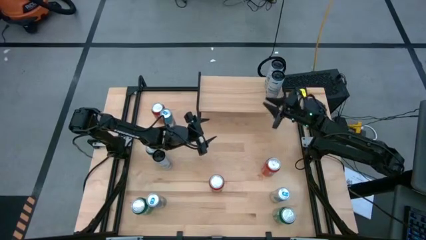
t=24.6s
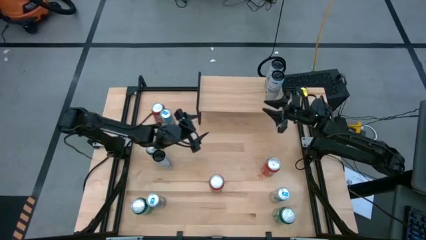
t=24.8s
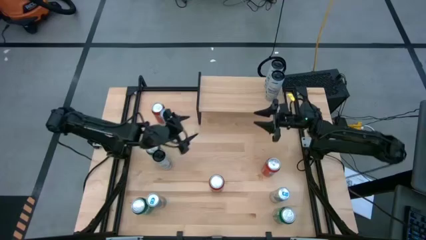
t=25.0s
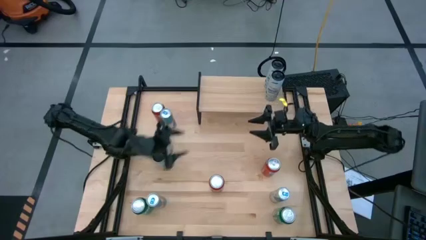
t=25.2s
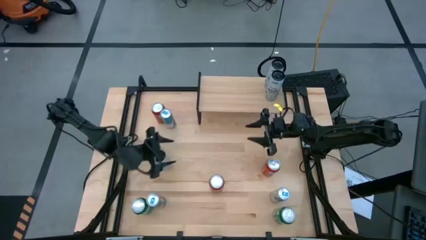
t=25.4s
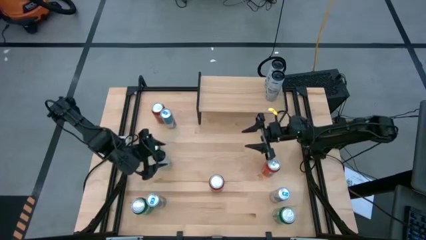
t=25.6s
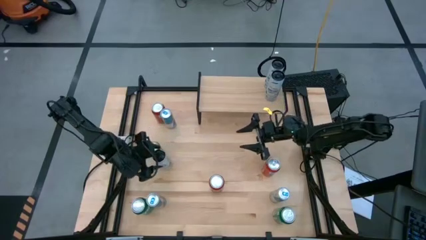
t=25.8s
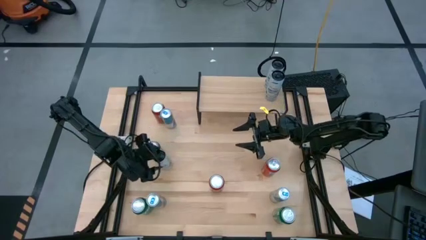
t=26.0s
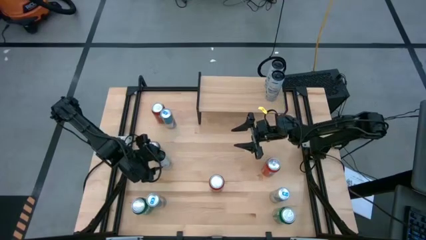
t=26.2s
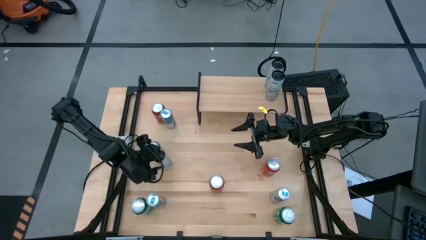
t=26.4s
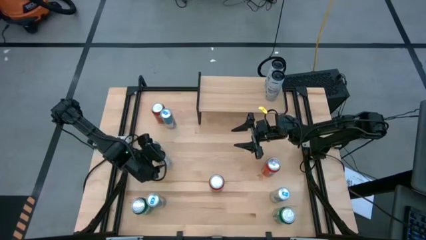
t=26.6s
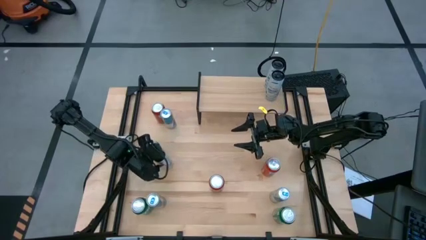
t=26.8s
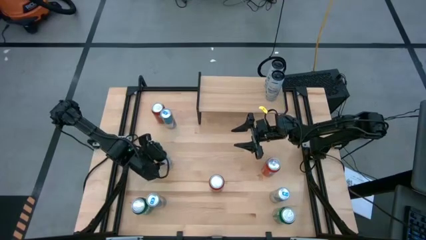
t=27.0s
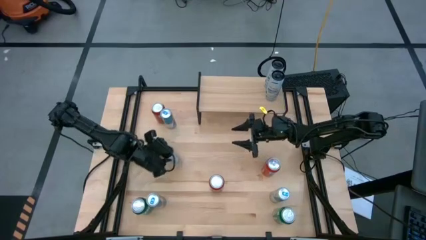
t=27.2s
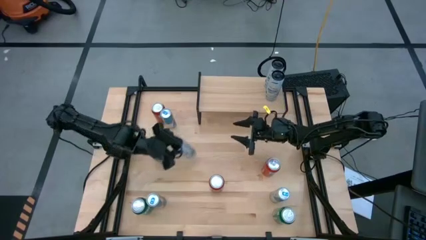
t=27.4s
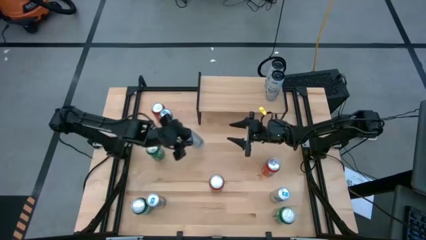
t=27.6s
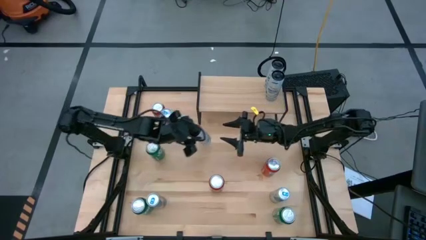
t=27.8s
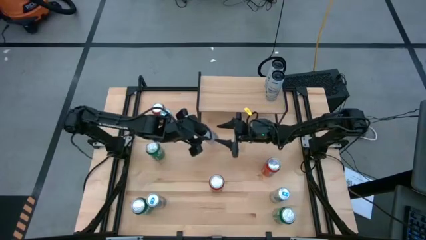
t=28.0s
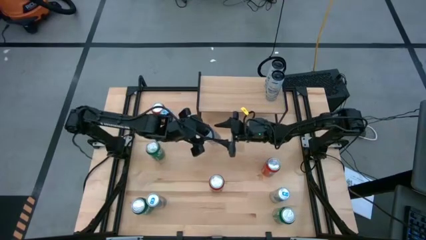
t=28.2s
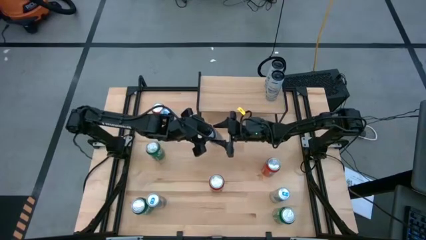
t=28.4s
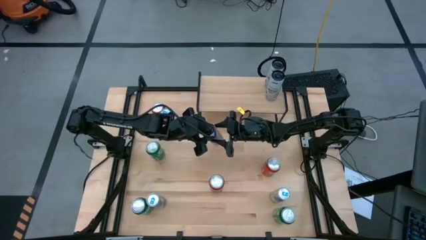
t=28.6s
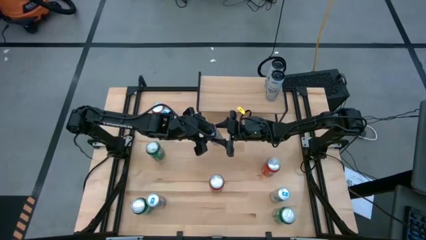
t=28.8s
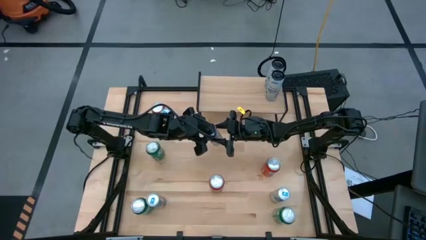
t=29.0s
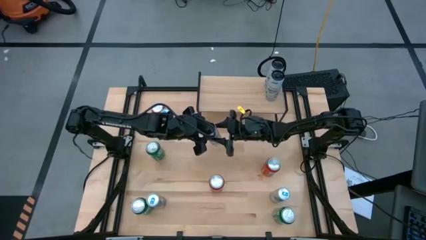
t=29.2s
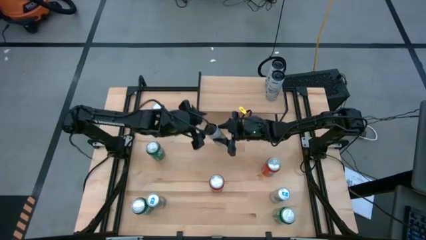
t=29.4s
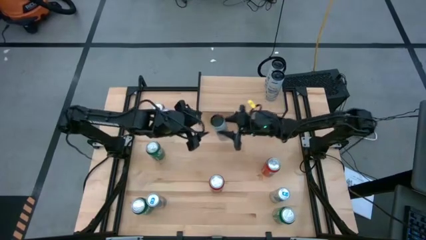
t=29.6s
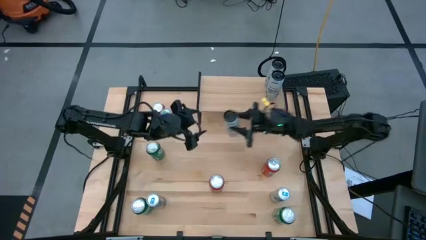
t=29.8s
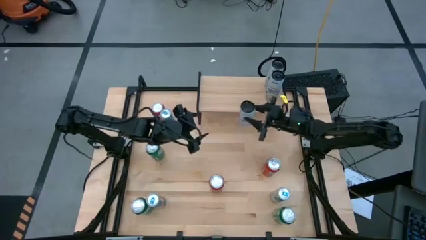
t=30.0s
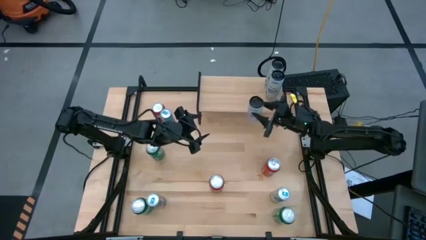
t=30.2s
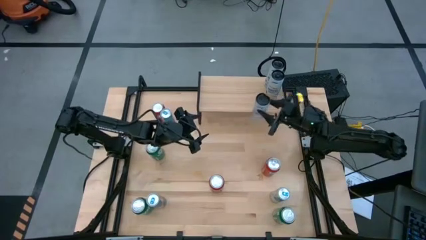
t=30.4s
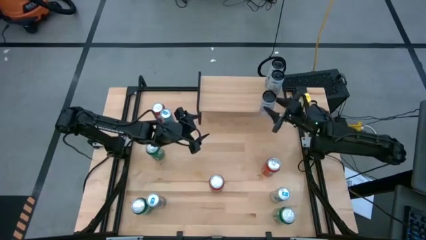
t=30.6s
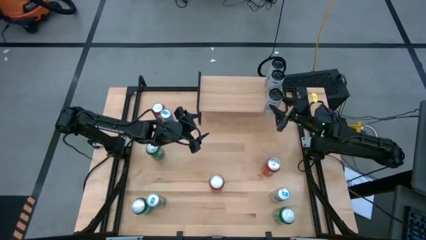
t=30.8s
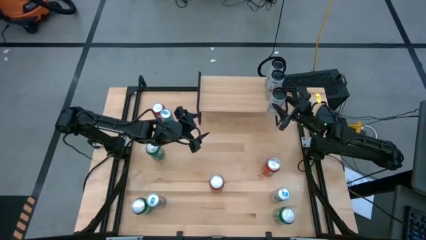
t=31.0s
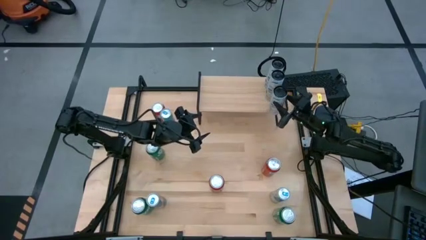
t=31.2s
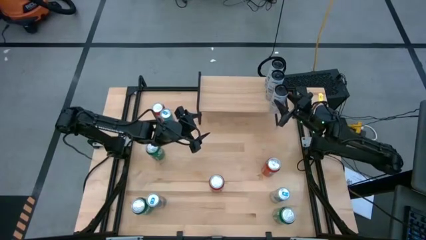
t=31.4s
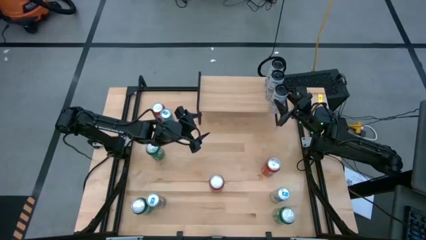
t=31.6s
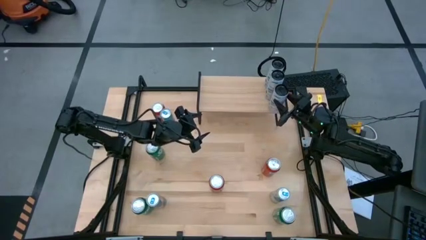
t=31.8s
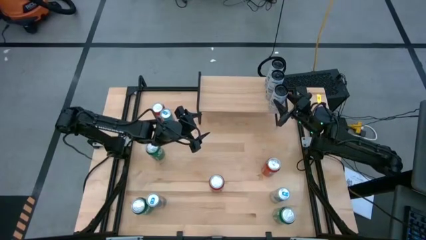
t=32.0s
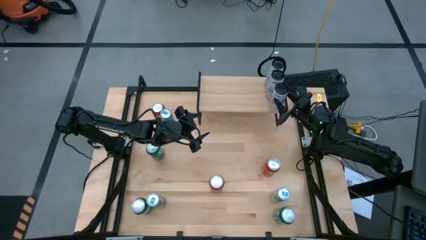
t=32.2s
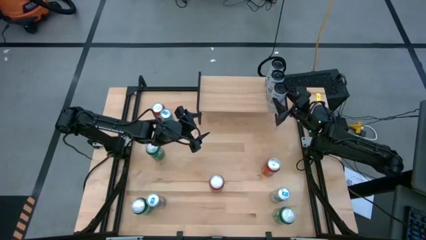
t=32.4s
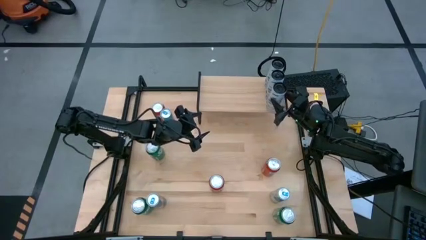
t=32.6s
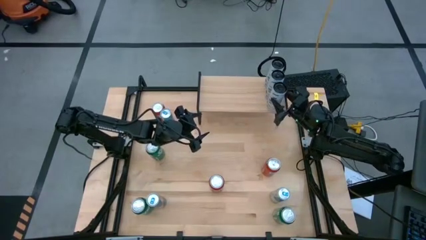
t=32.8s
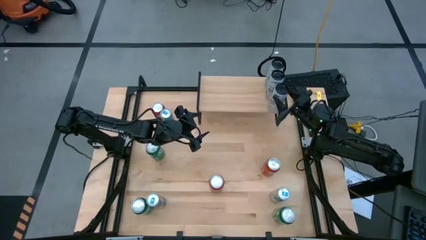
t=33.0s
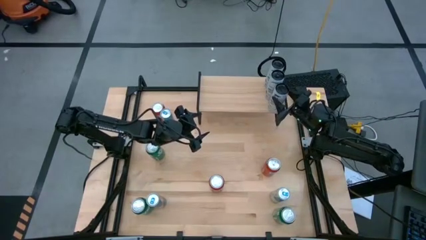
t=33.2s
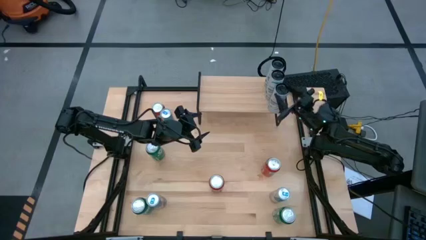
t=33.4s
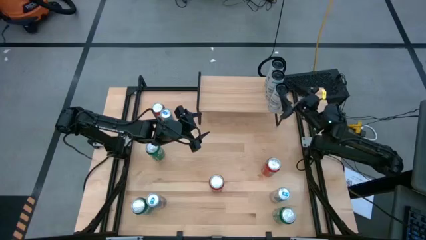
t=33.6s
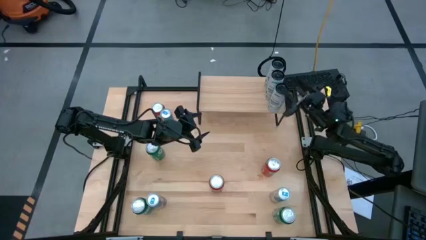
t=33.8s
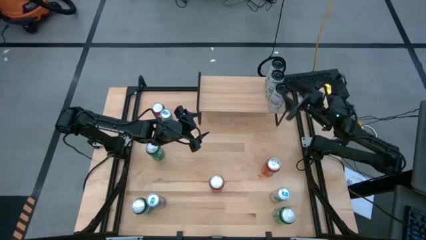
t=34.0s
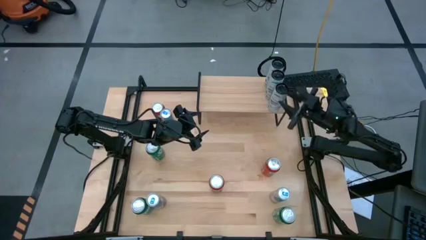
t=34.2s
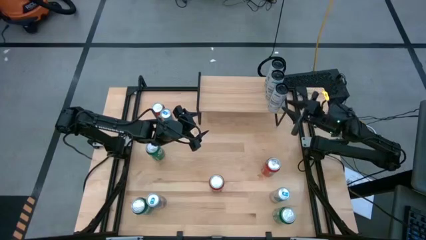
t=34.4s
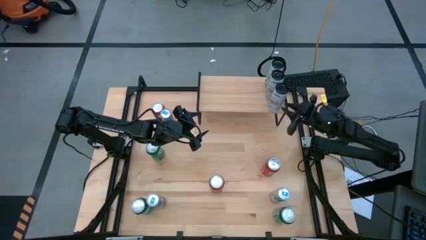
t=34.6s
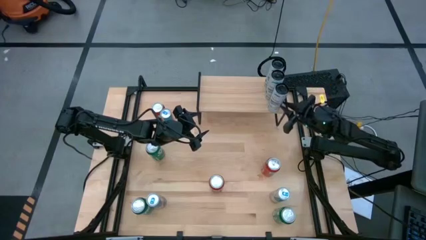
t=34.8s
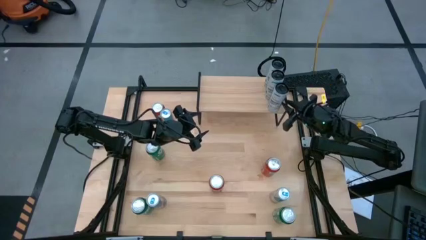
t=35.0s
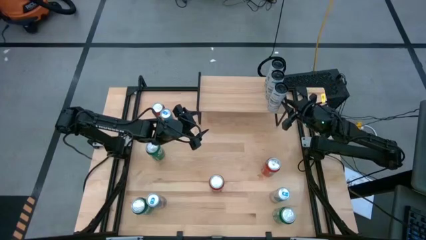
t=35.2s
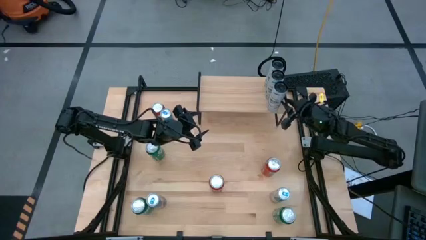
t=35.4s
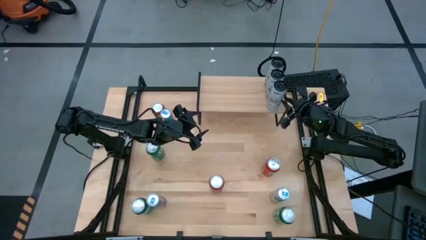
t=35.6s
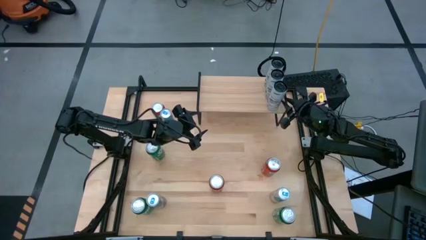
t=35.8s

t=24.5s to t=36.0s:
Task: Place canned beverage on shelf
Put the white-blue soda can on the shelf aligned with the other white-blue soda cans

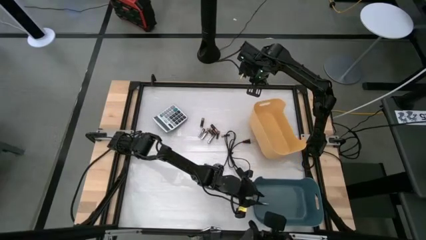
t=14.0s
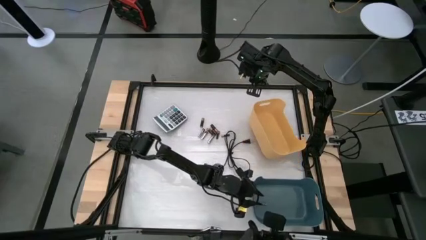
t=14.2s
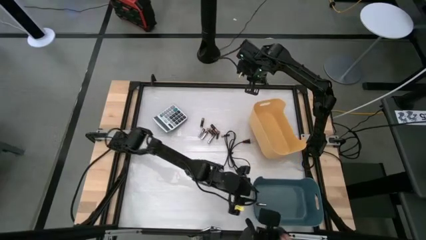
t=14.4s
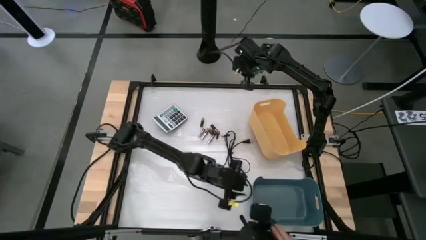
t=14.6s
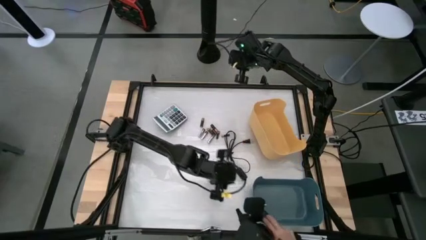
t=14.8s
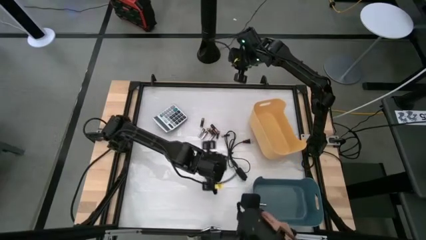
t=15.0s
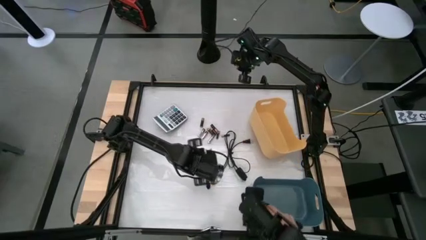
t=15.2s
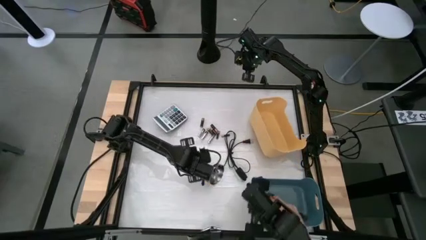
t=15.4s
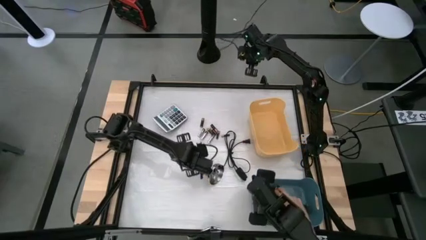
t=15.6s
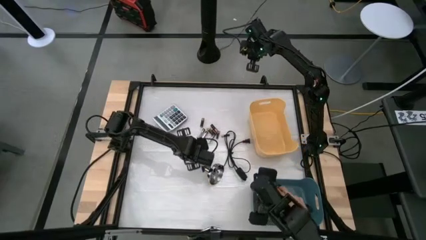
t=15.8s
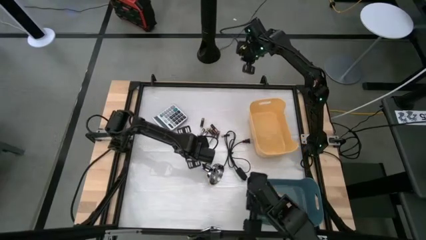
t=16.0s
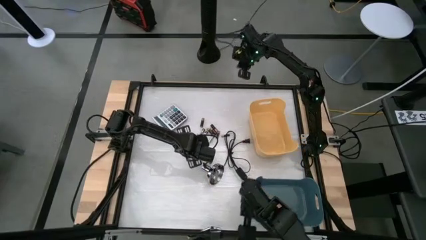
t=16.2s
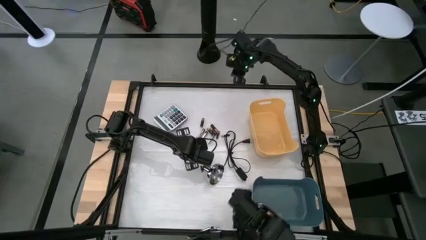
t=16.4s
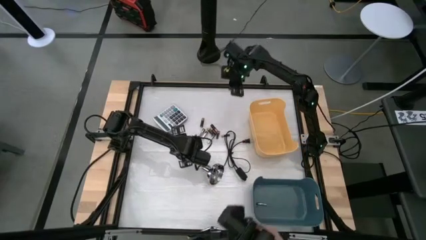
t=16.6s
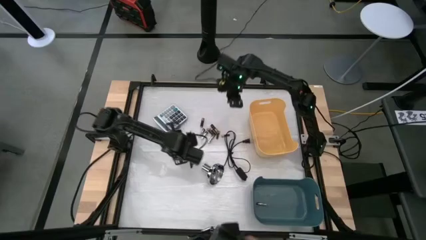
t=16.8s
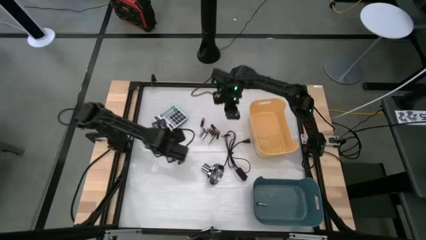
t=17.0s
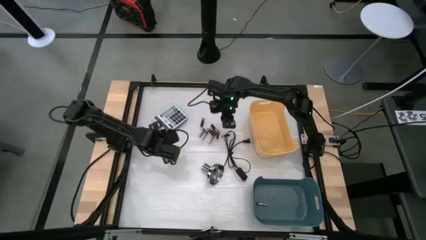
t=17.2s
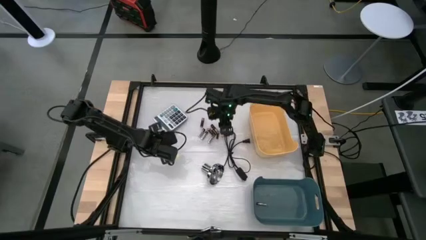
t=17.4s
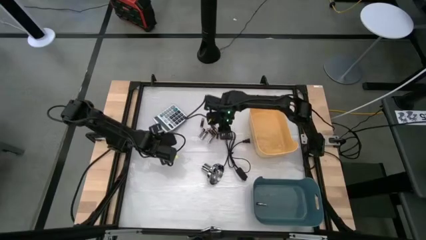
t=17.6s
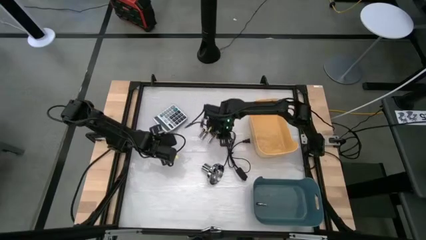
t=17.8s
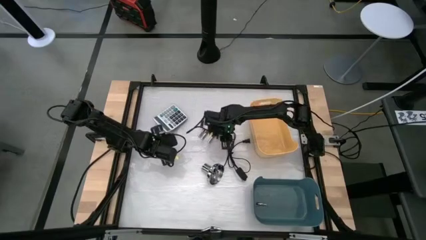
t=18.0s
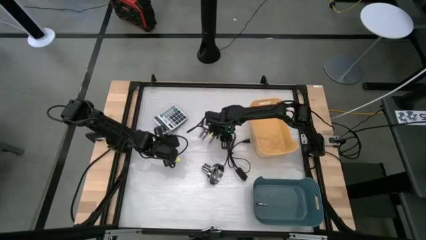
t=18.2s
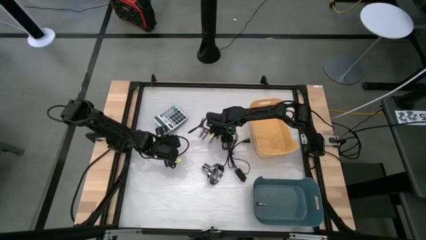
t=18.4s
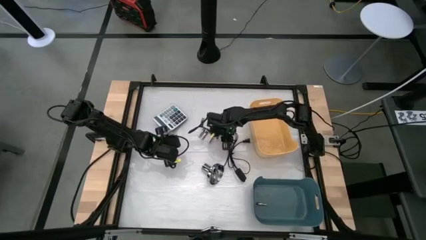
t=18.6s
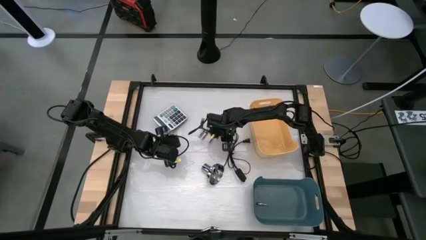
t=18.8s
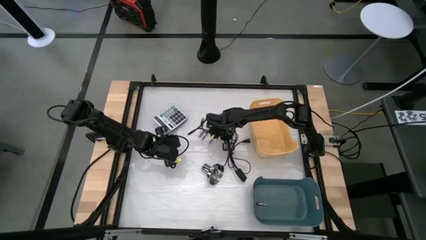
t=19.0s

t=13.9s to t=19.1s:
Task: Sort batteries
Put the black battery into the yellow bin
